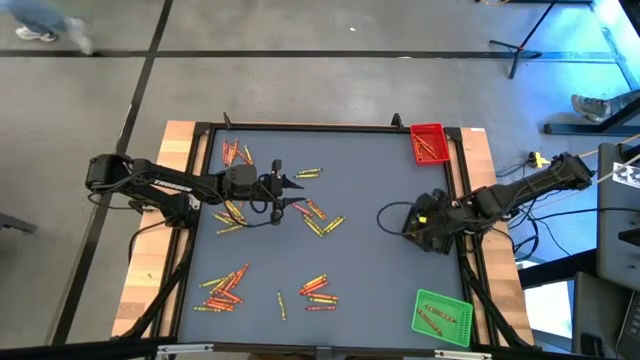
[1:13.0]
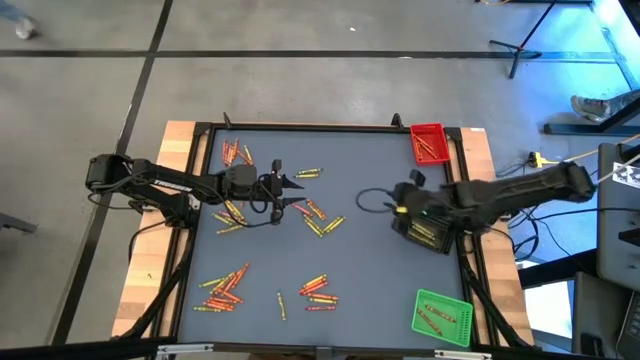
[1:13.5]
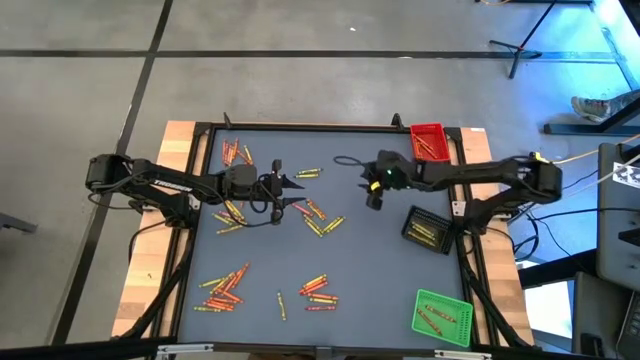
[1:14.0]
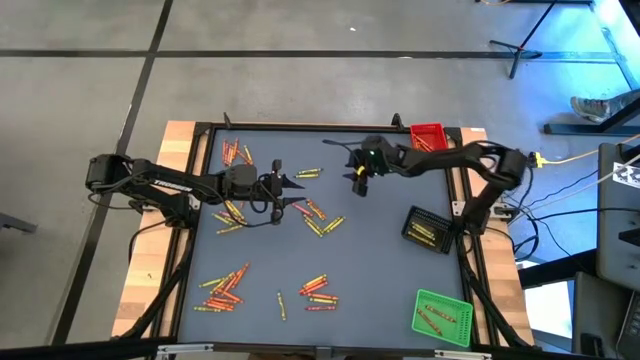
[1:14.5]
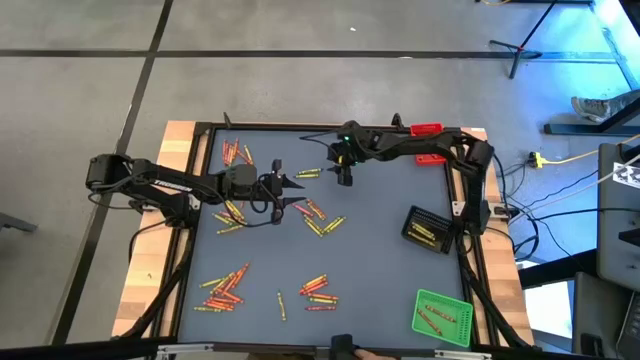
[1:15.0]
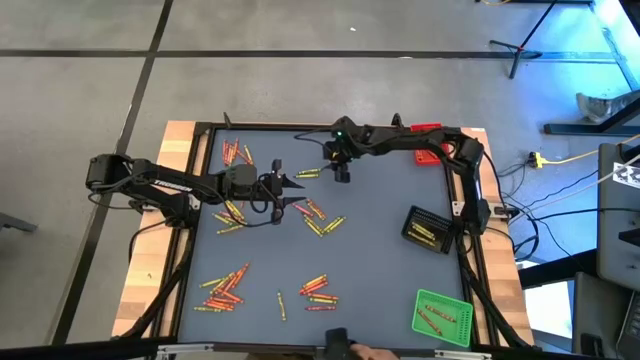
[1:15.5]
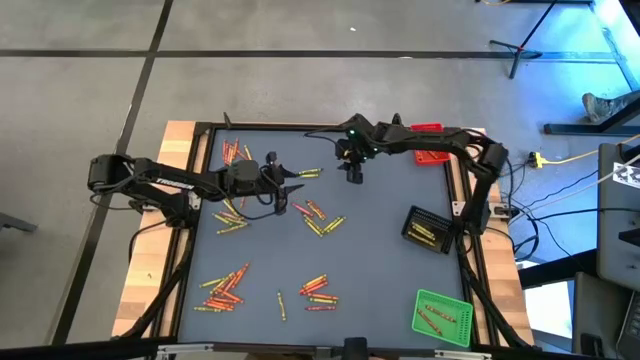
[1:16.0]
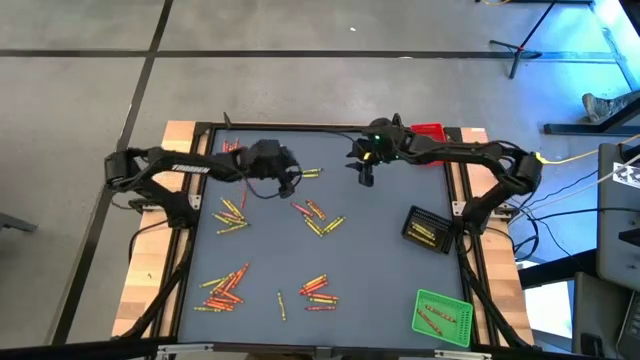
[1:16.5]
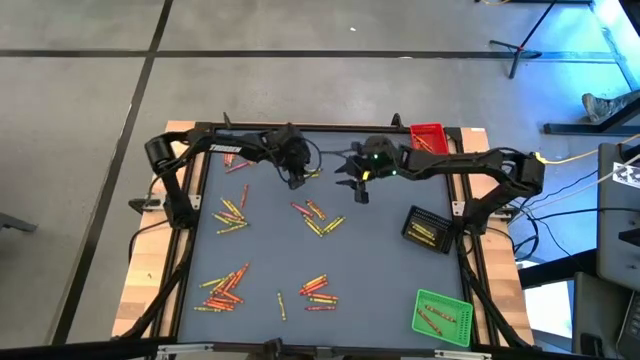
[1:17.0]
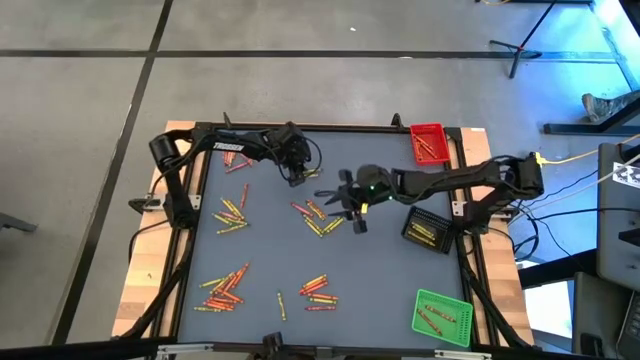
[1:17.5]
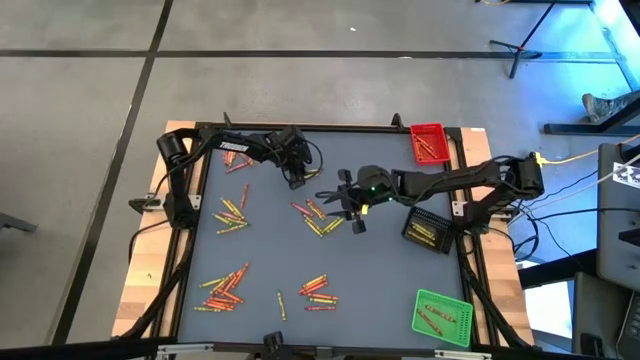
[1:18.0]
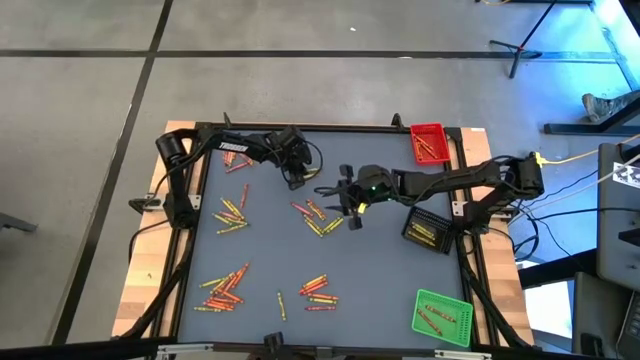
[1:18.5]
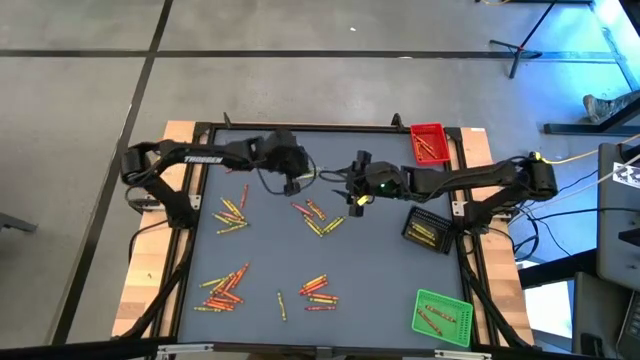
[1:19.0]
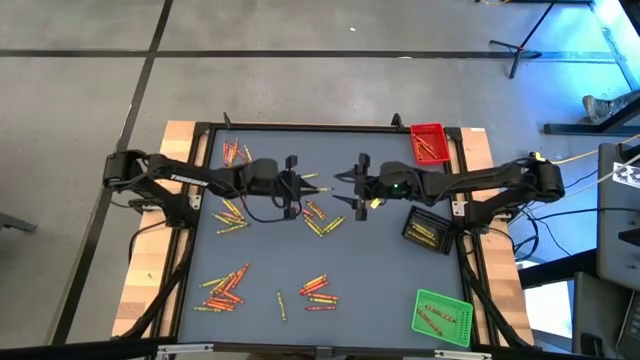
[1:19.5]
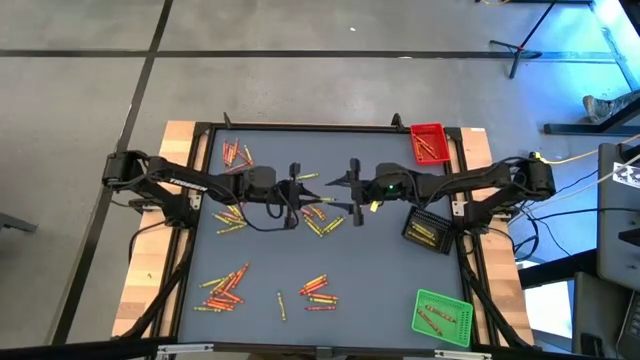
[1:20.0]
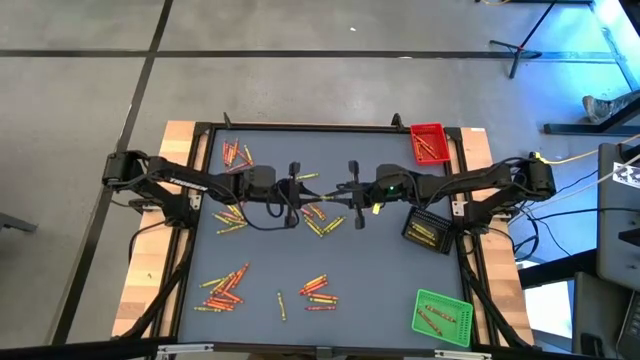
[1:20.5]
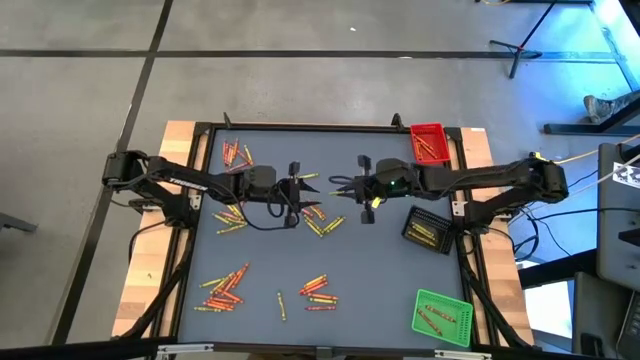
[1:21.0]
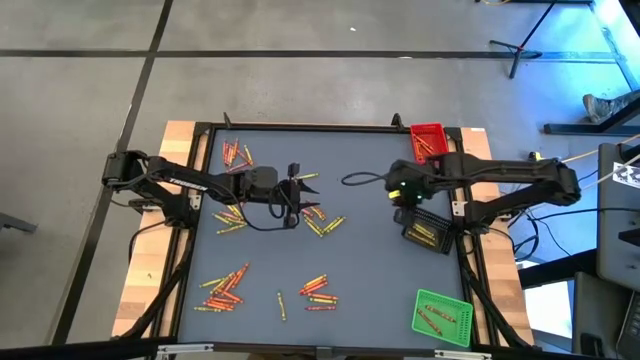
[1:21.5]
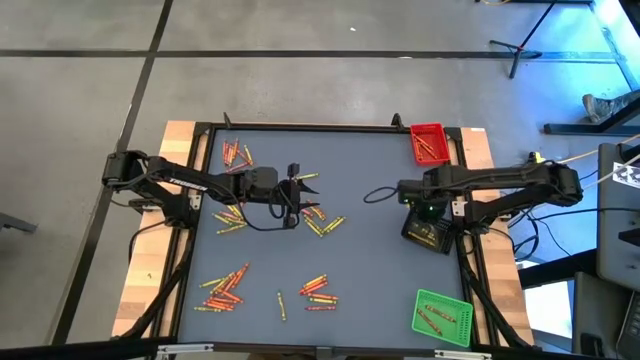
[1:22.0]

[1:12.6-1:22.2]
Task: Sort crayons
Put the green crayon into the black basket

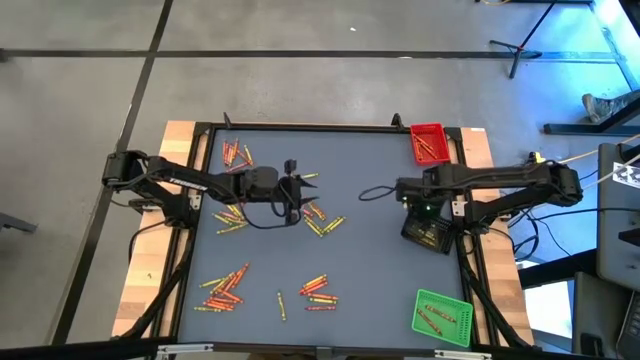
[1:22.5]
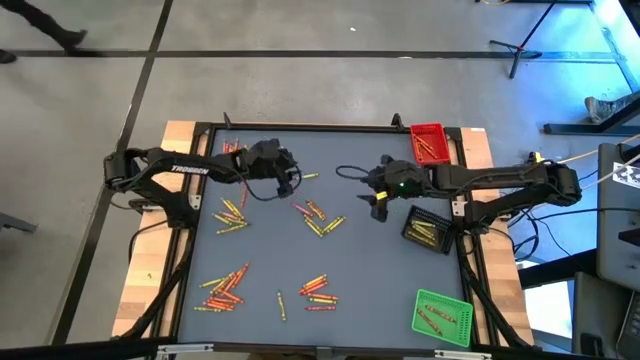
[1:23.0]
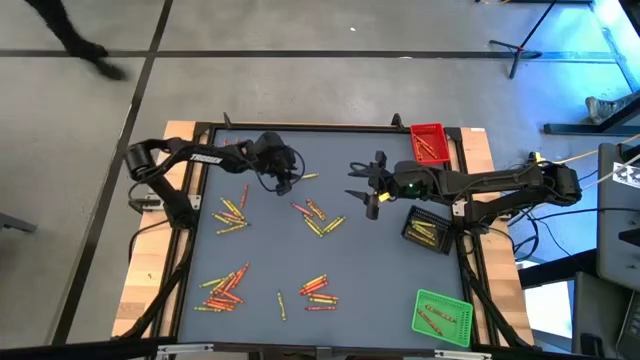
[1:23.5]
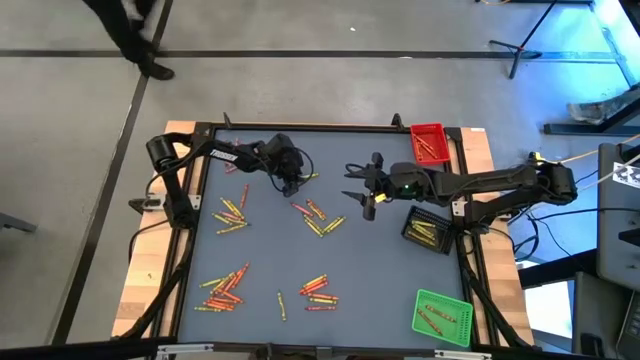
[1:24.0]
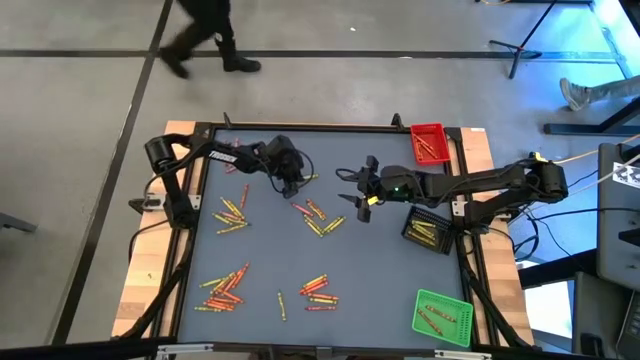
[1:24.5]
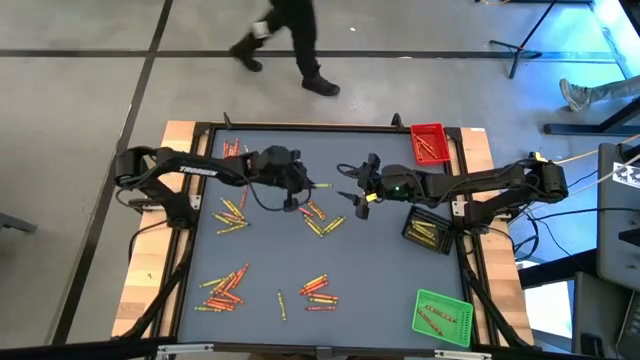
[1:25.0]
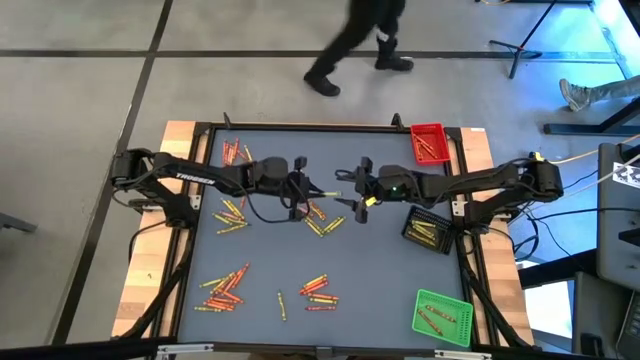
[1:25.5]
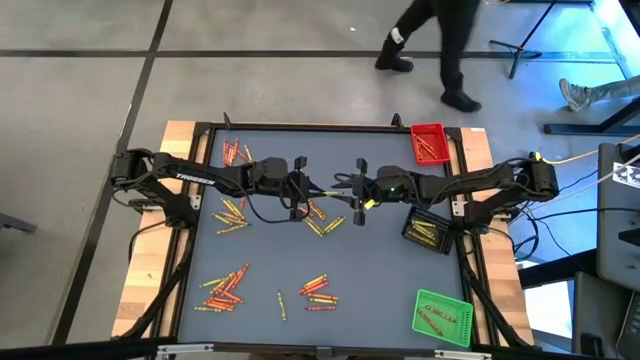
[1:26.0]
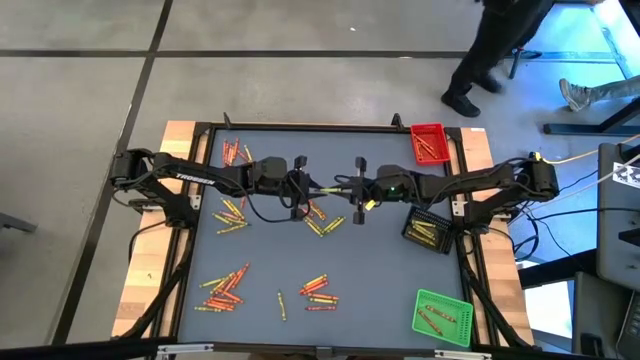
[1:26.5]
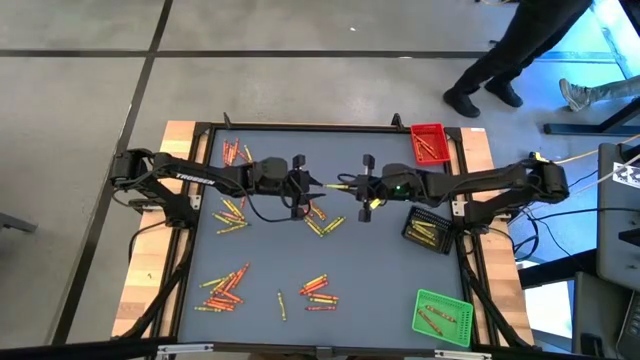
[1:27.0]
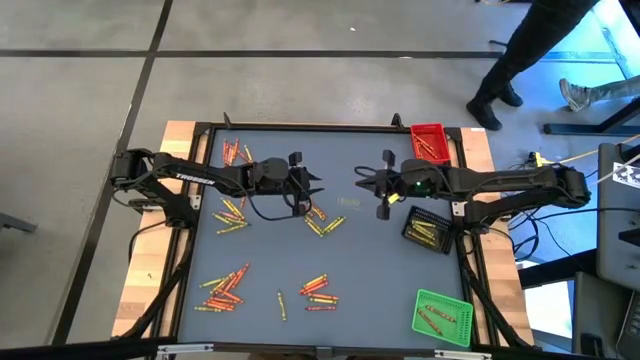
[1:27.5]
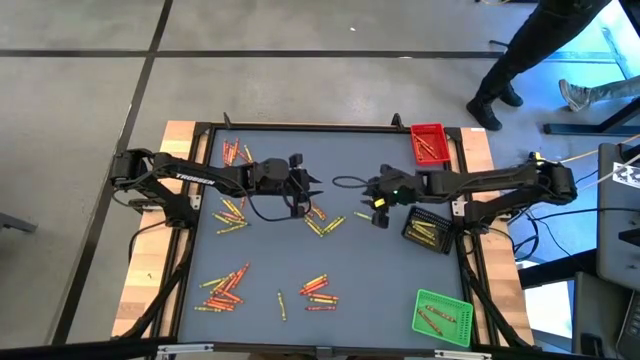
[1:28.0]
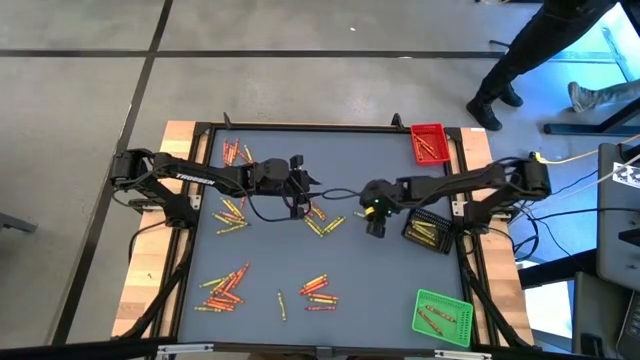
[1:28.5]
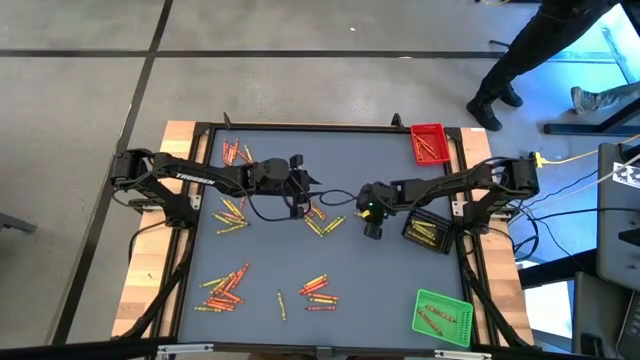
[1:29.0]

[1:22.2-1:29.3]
Put the green crayon into the black bin

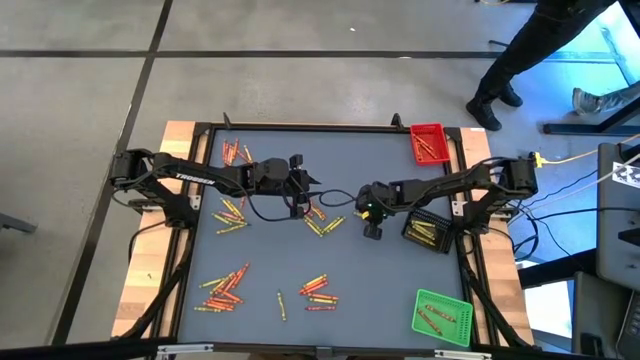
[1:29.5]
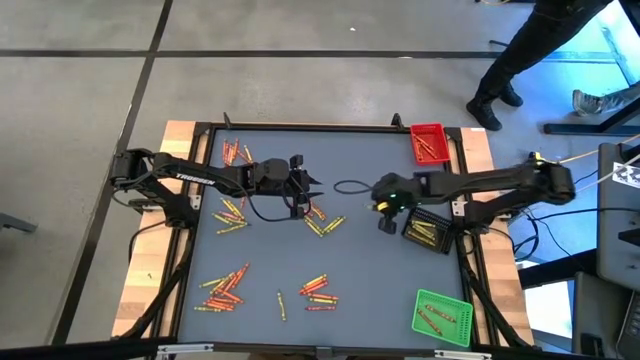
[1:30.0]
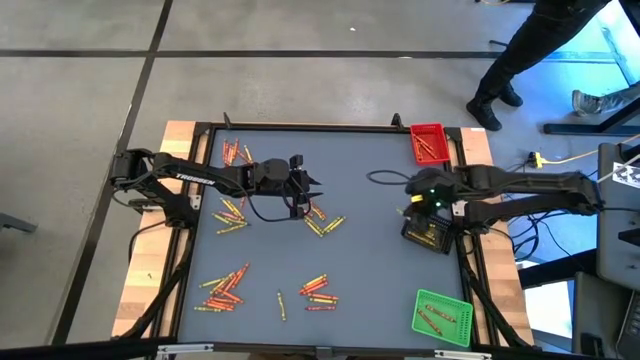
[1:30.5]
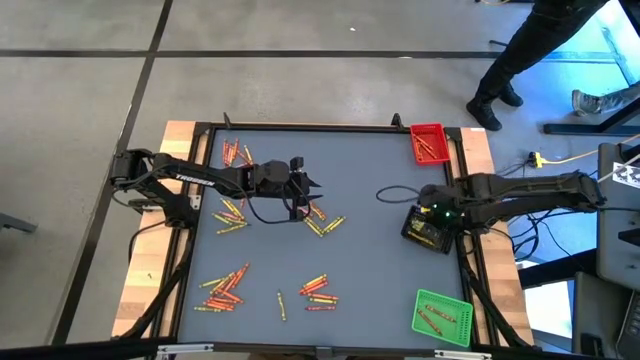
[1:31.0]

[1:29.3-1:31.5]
Put the green crayon into the black basket
